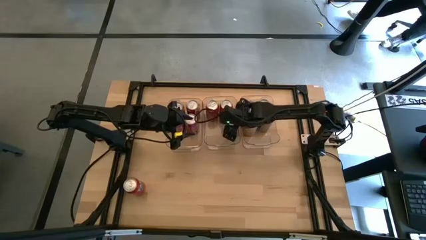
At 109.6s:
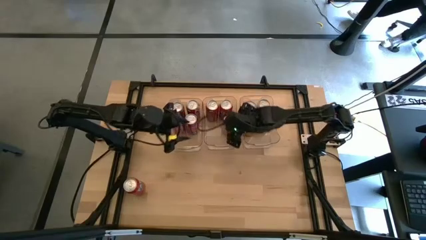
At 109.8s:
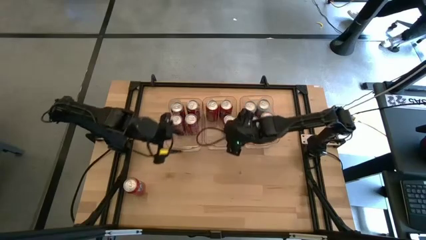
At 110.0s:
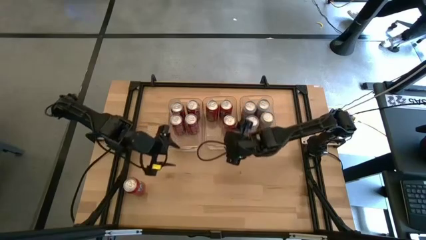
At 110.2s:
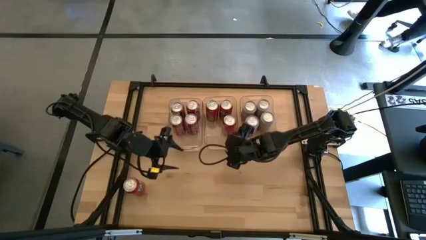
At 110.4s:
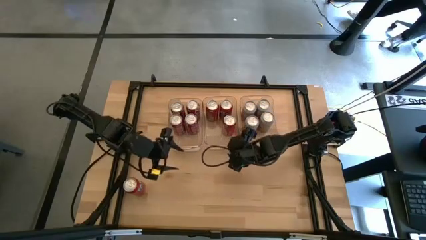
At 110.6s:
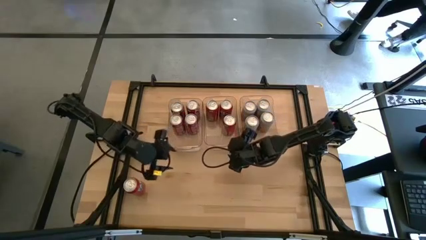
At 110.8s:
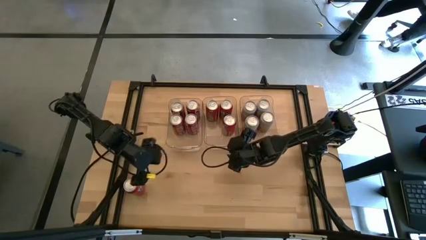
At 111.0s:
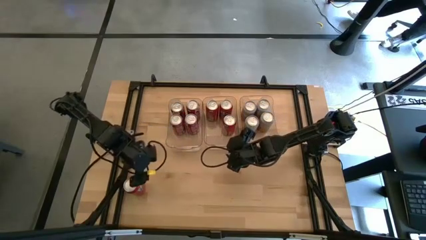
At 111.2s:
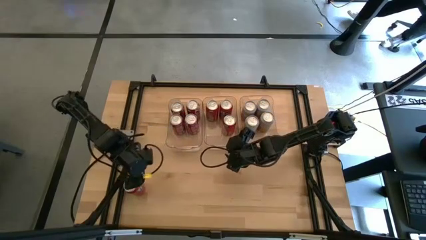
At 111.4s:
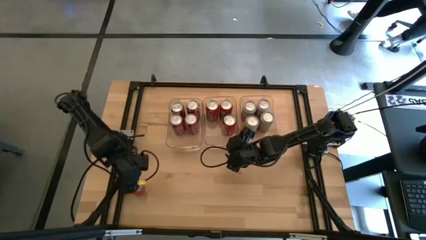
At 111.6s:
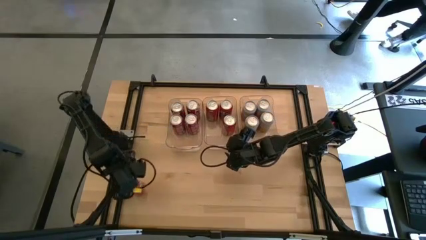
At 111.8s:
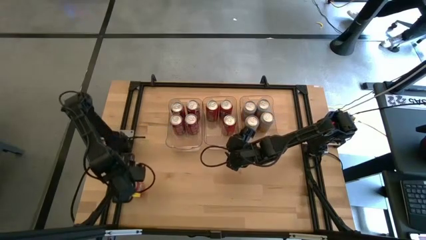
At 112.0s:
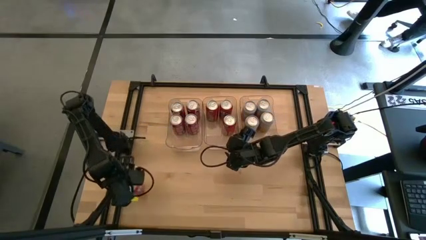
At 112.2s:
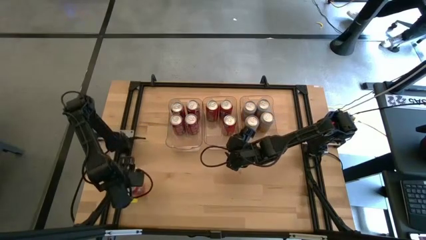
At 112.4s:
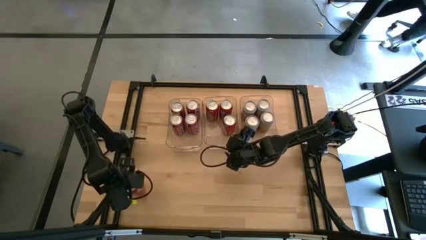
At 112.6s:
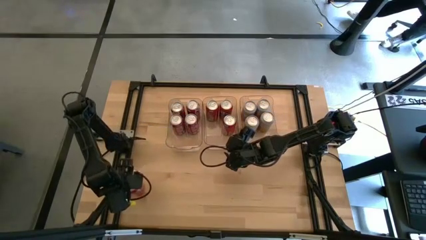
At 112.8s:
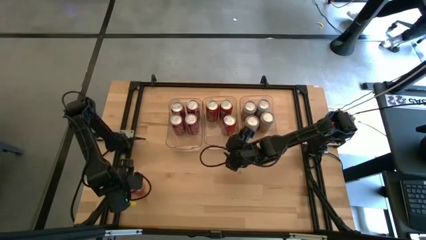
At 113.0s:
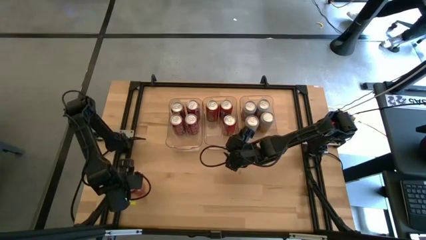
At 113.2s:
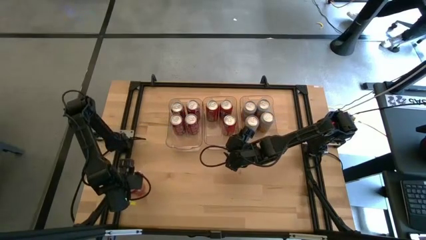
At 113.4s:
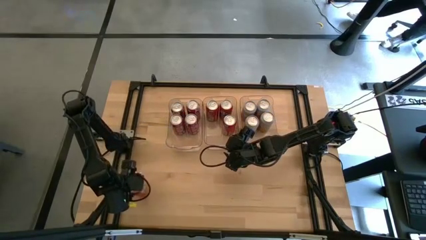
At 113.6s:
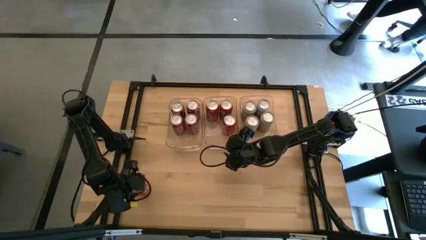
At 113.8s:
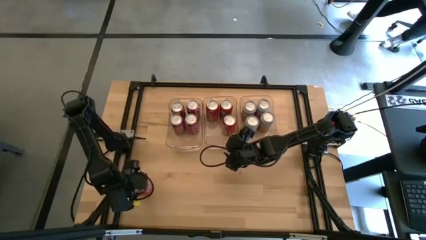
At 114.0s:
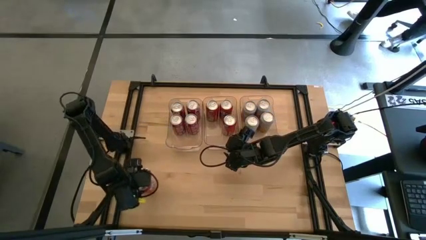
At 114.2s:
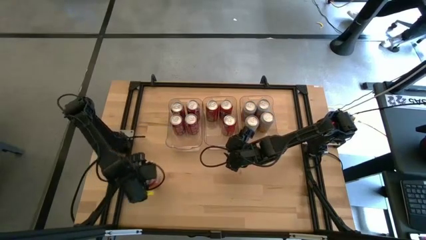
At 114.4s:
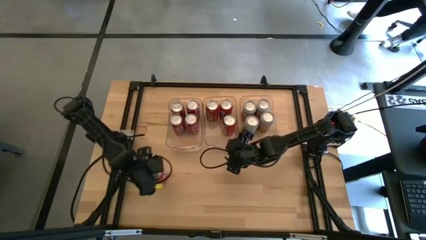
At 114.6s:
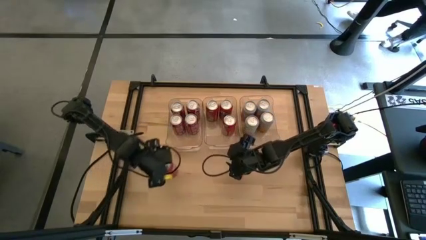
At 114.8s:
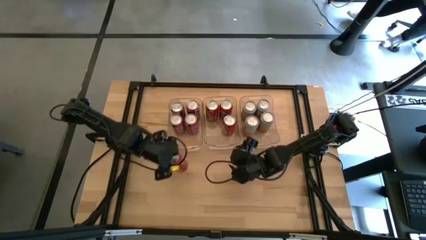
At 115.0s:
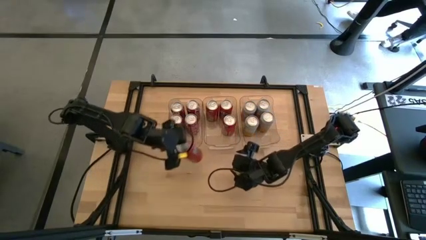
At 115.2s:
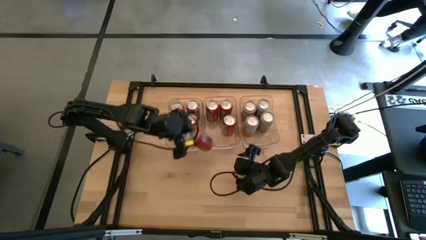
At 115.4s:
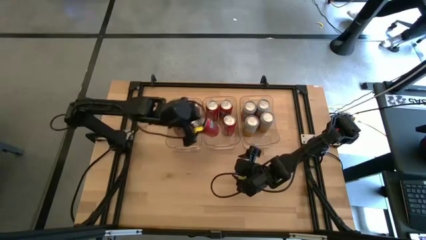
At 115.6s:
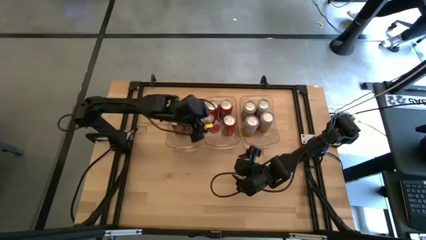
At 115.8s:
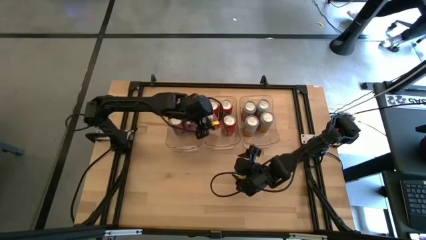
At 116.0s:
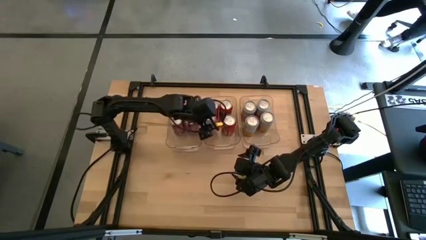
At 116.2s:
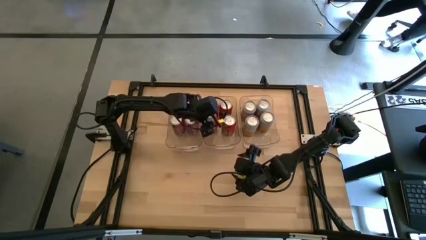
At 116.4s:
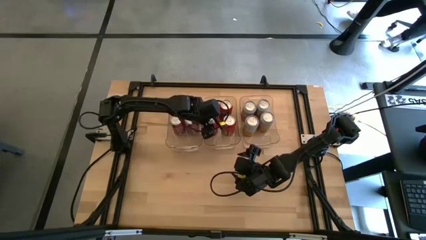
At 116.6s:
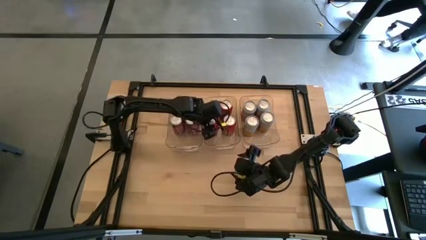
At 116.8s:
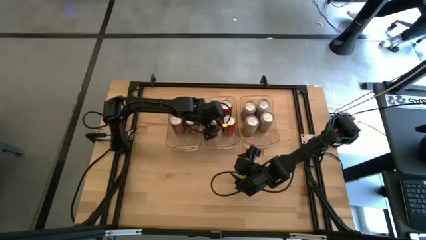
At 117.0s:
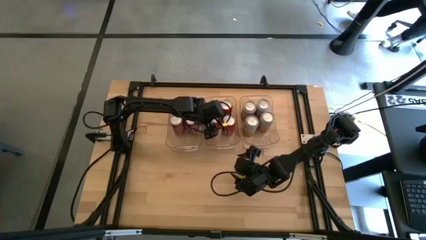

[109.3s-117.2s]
Task: Sort soda cans
Put the orange soda can into the middle transparent bin

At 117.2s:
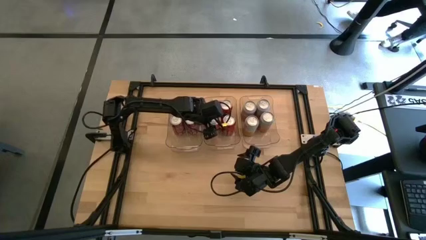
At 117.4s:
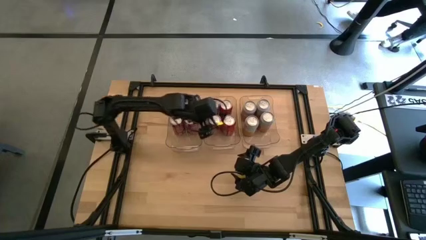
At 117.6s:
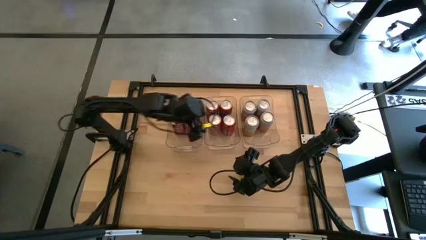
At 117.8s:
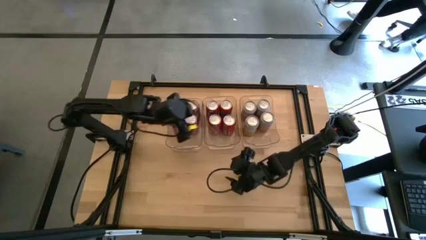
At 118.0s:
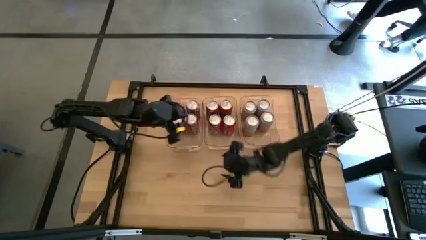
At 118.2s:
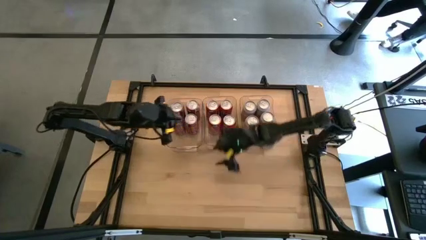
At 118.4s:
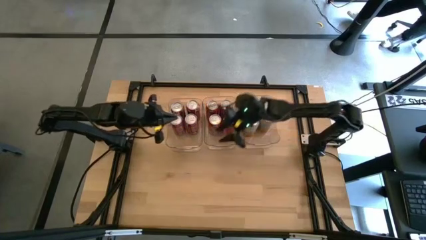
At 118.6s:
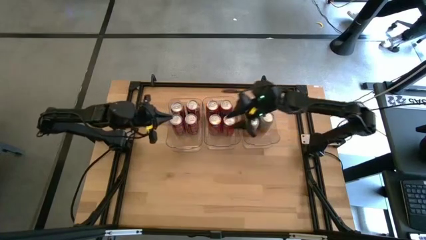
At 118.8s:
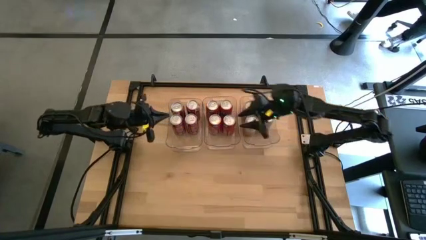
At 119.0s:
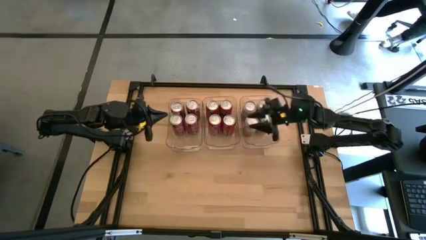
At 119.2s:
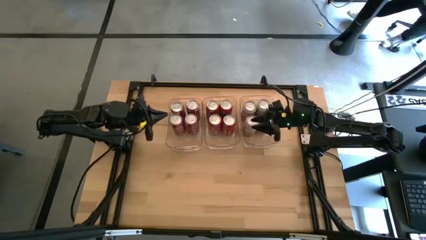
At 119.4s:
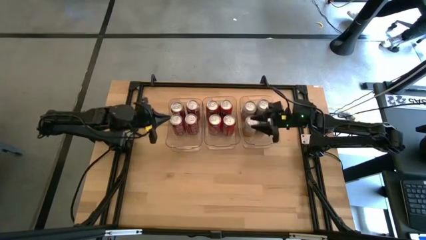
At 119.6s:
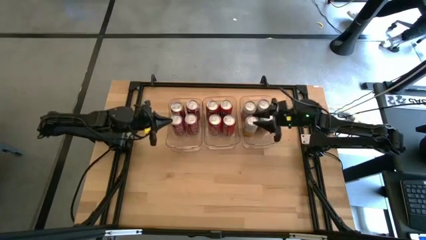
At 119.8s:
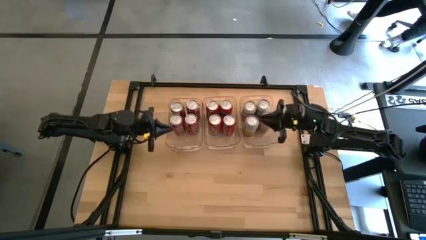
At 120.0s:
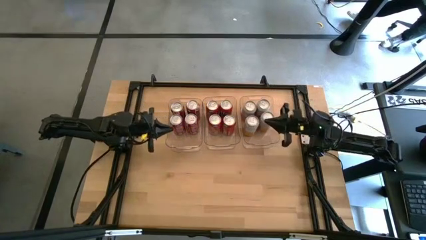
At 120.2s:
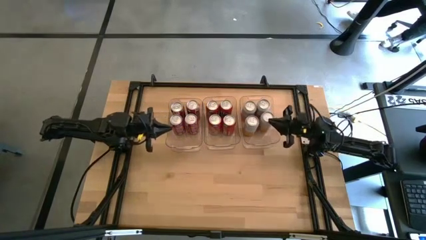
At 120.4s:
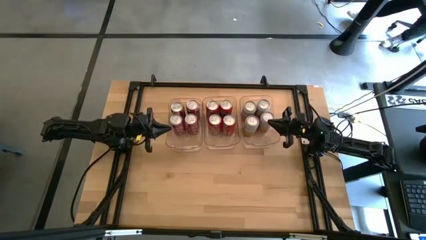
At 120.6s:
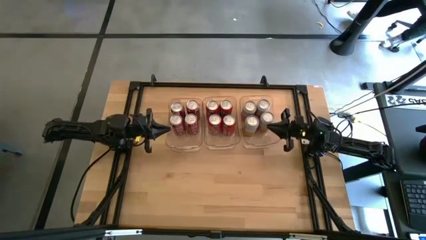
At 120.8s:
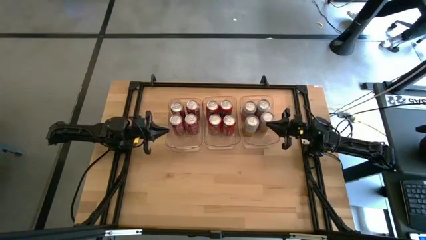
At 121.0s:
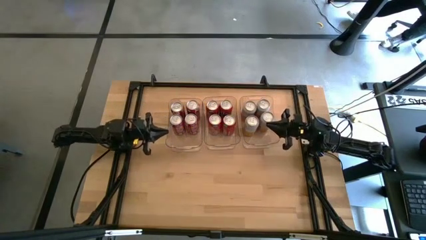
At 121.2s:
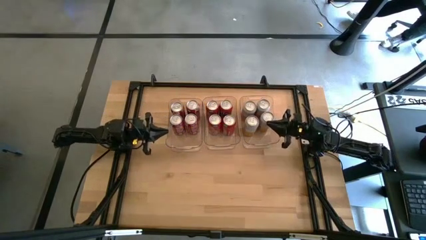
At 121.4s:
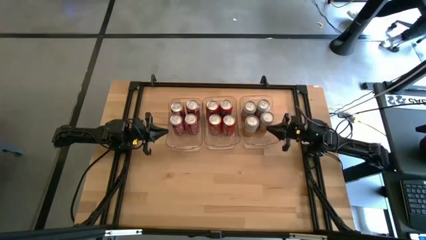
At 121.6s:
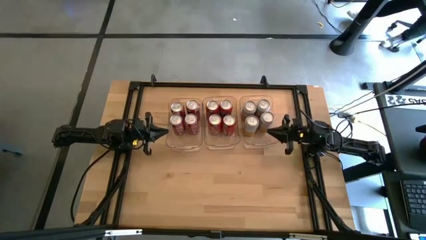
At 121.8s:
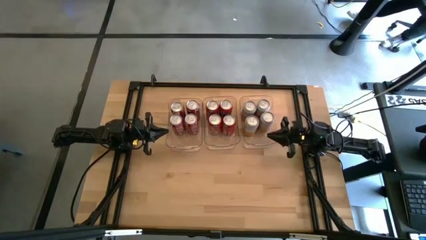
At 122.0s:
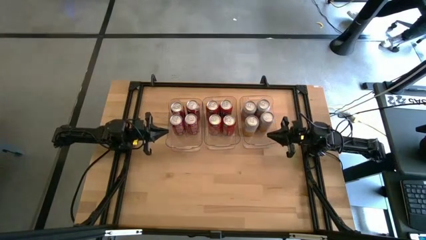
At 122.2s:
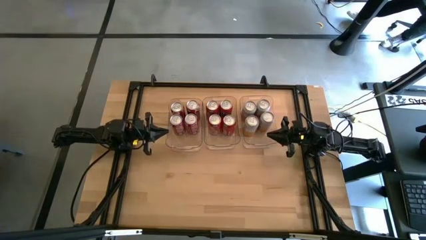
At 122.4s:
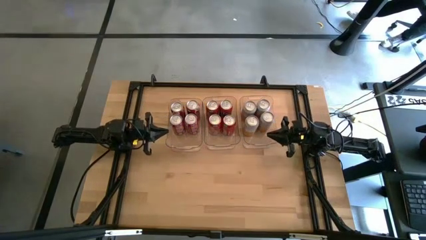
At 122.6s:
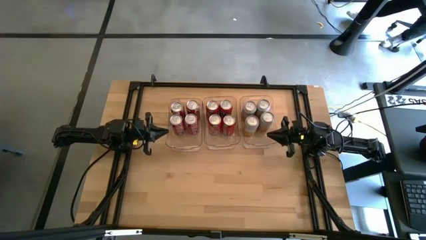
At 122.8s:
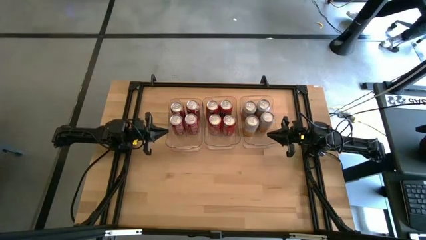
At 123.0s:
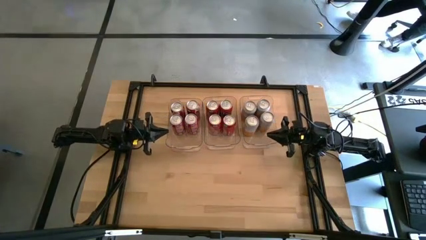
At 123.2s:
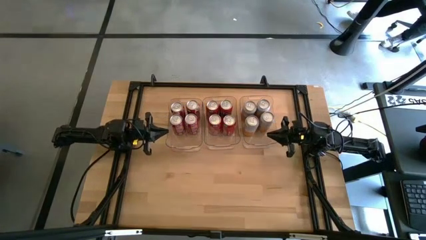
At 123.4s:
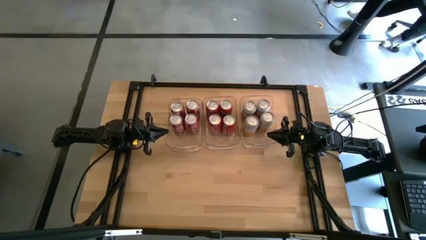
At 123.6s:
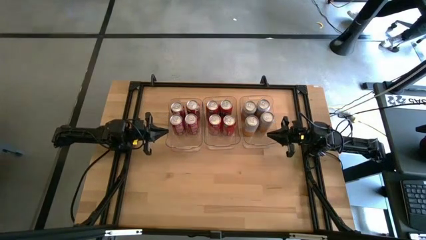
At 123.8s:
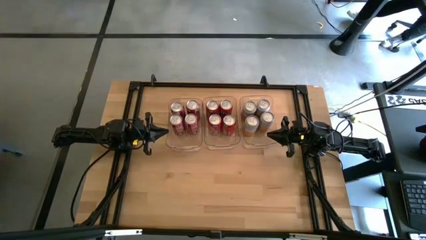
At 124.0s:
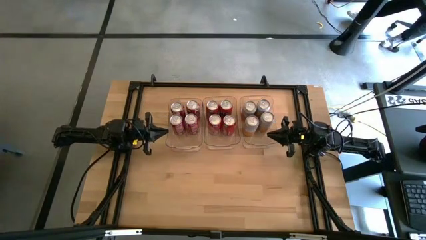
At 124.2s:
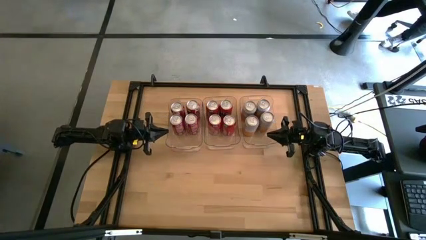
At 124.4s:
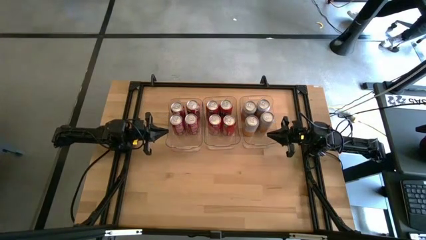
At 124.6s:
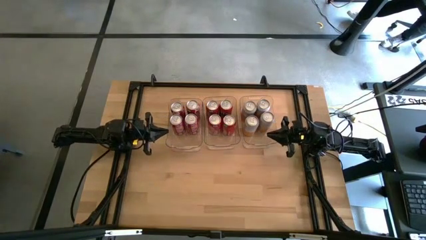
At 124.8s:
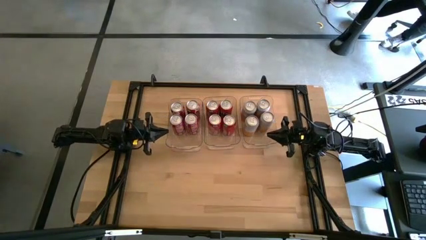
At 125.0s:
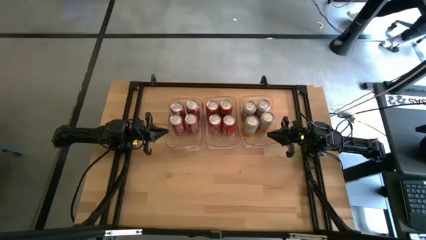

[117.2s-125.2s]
Return to Home Position

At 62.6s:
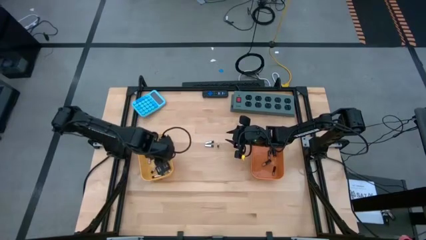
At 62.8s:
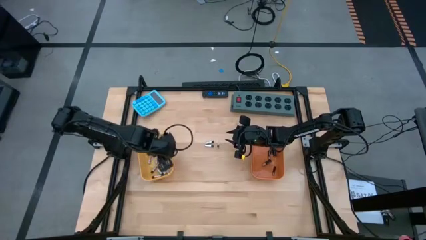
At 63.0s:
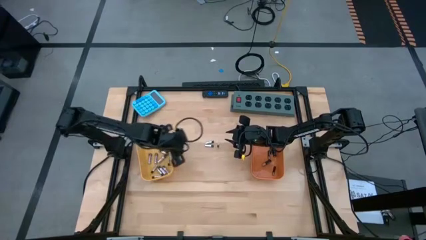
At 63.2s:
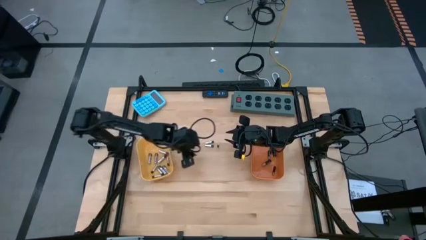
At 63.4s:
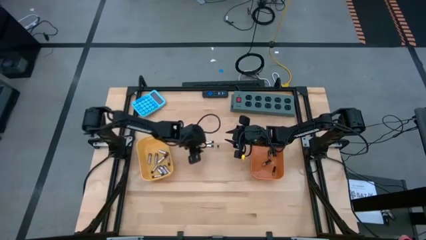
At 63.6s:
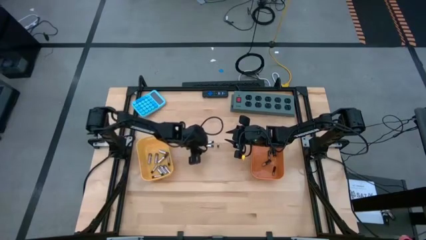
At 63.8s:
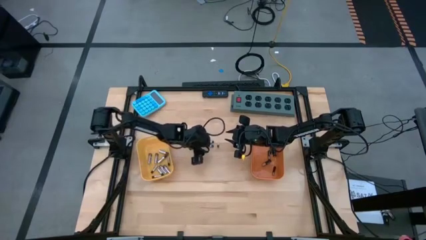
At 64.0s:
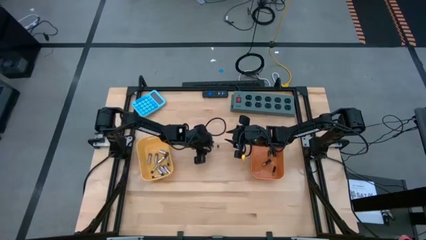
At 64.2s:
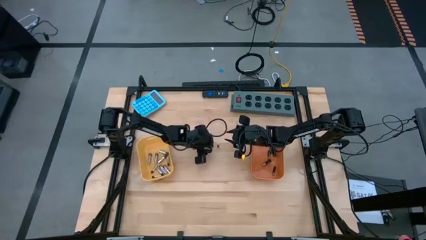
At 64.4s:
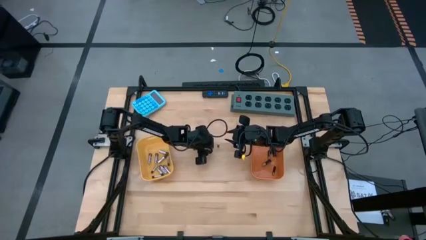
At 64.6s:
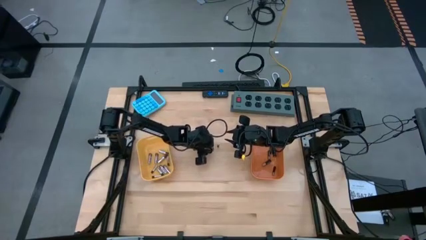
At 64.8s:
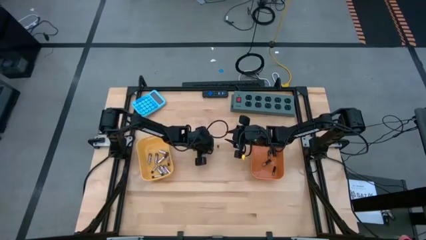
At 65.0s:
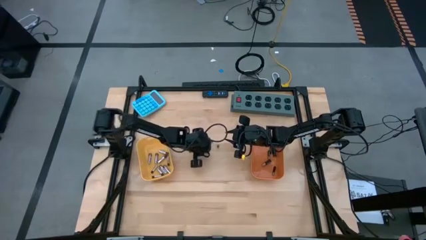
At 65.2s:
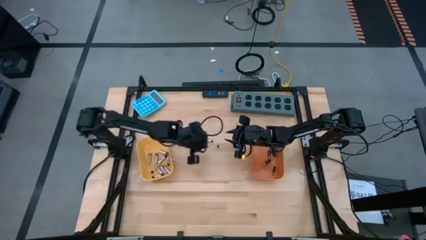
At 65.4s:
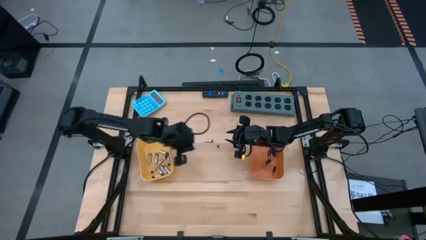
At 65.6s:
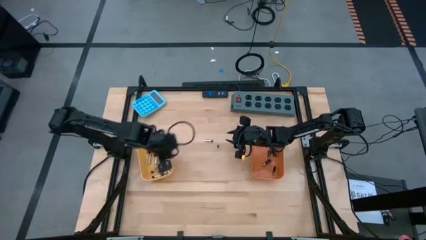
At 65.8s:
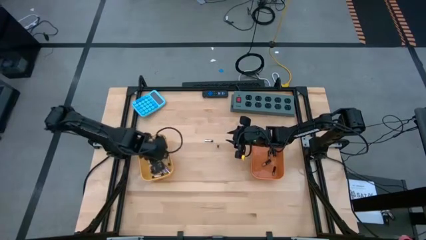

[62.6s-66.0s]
Task: Sort batteries
Put the silver battery into the yellow bin
